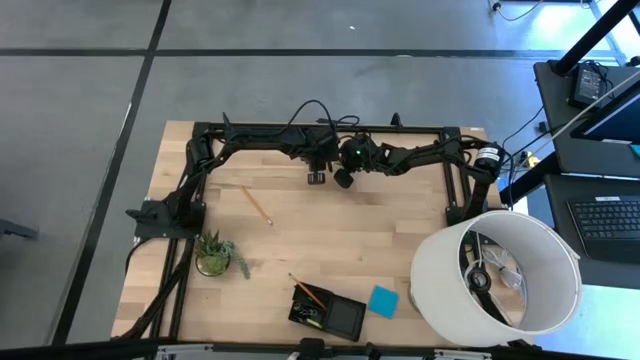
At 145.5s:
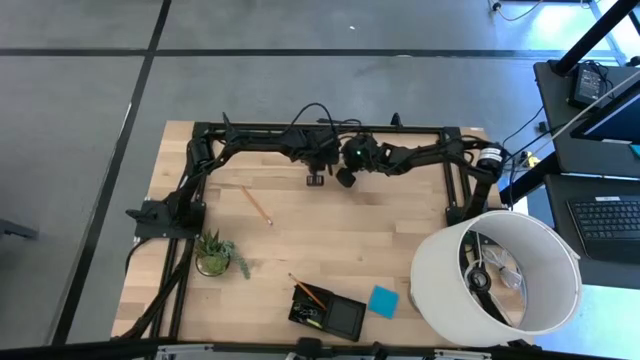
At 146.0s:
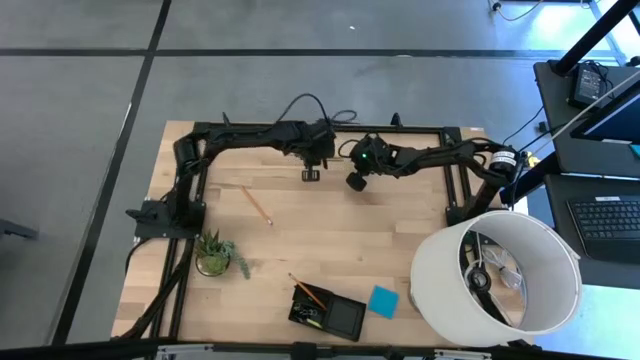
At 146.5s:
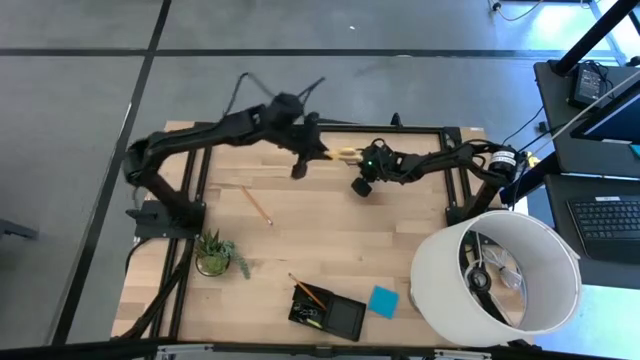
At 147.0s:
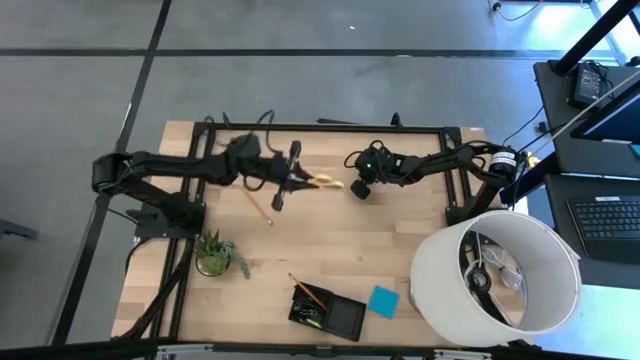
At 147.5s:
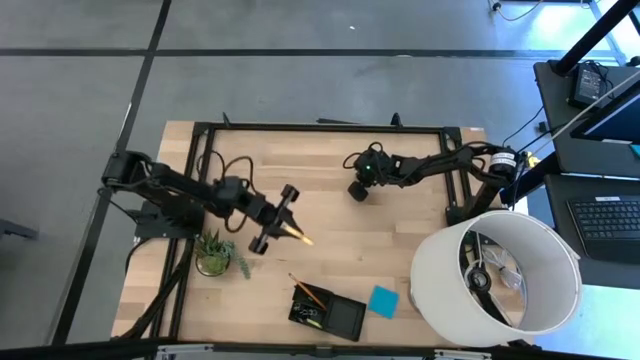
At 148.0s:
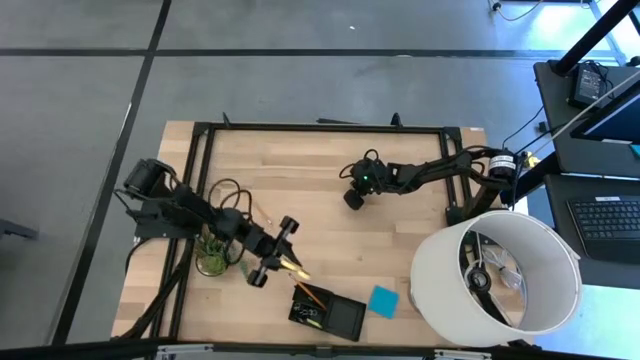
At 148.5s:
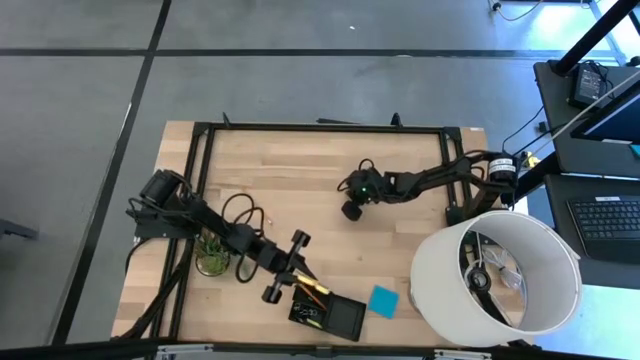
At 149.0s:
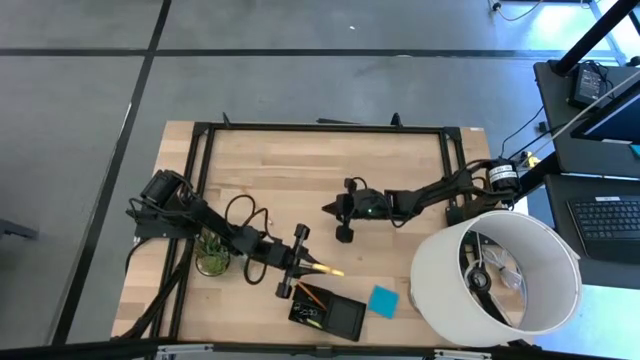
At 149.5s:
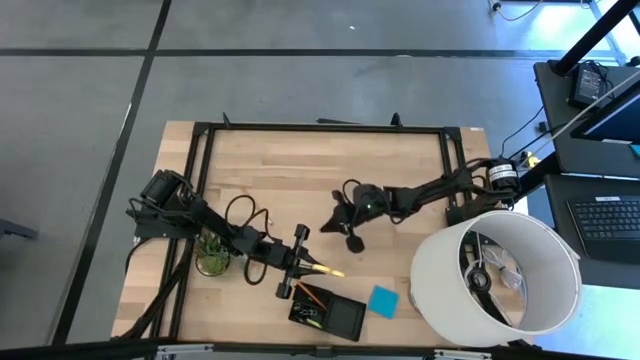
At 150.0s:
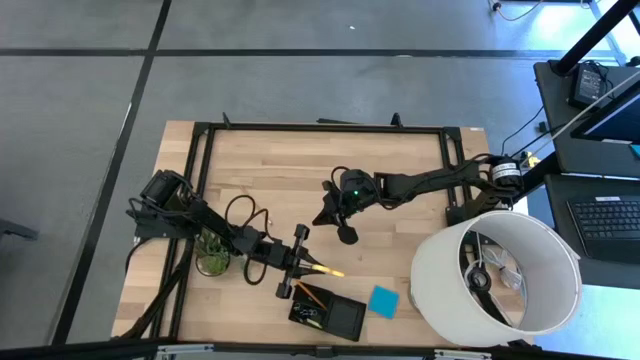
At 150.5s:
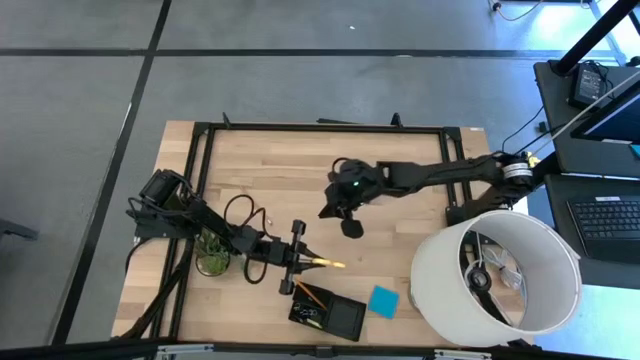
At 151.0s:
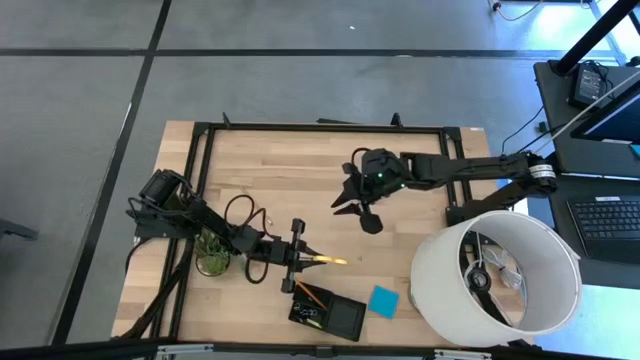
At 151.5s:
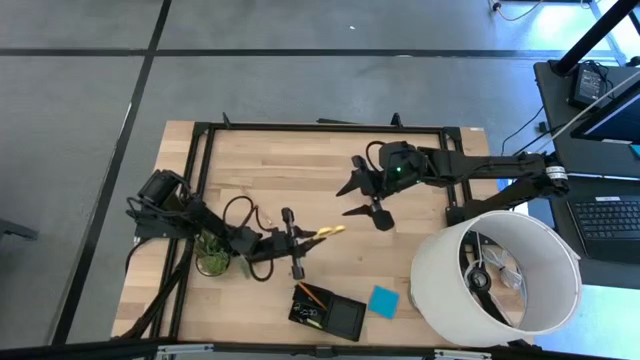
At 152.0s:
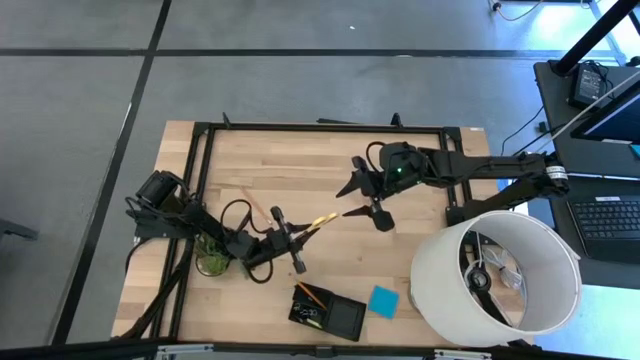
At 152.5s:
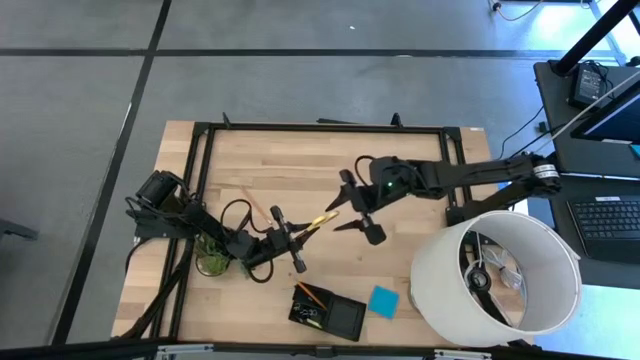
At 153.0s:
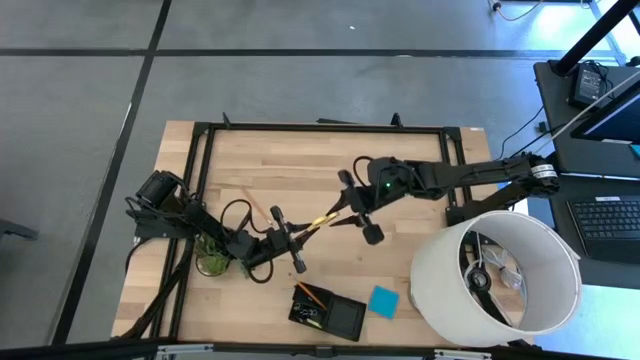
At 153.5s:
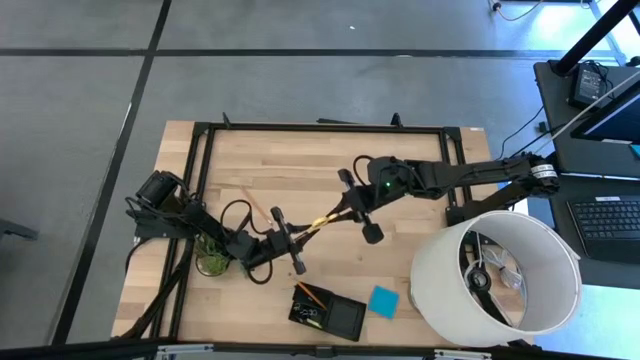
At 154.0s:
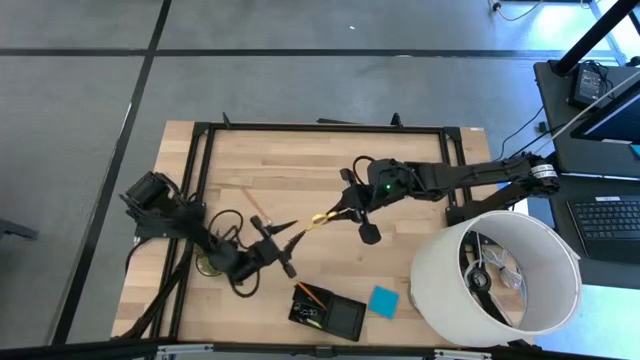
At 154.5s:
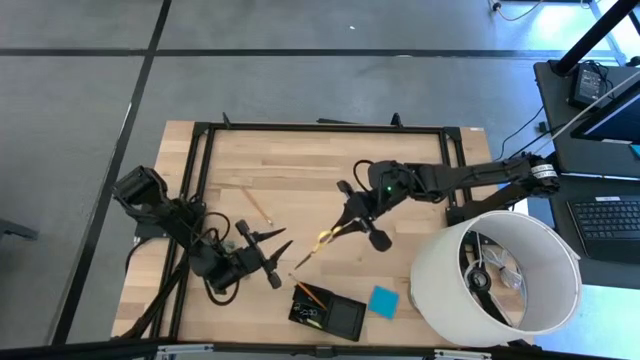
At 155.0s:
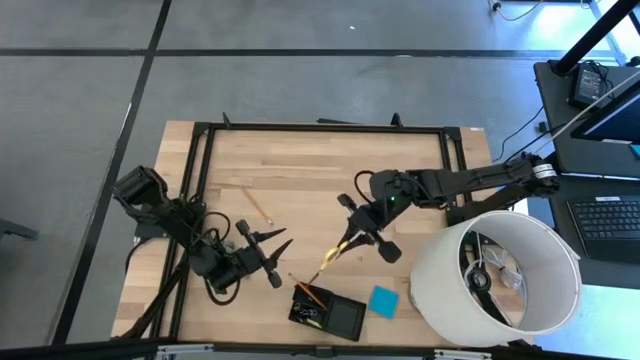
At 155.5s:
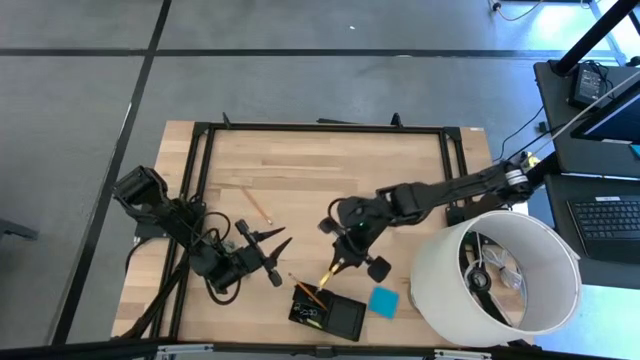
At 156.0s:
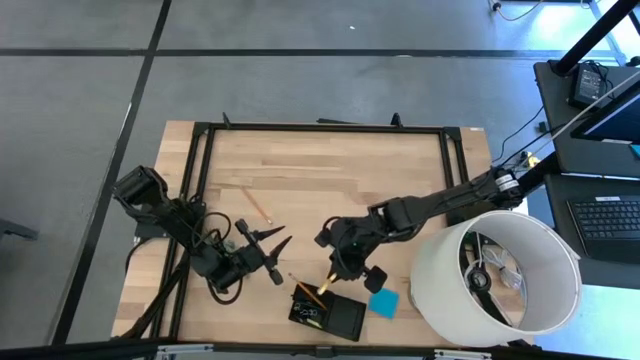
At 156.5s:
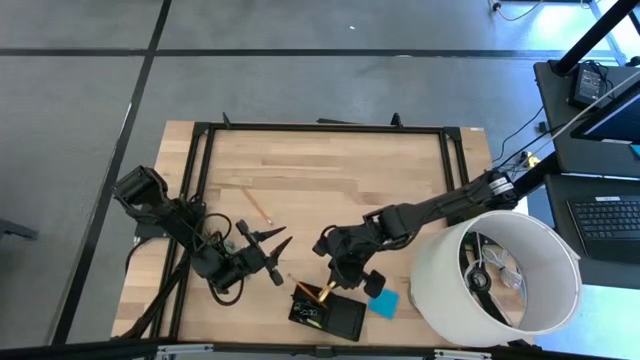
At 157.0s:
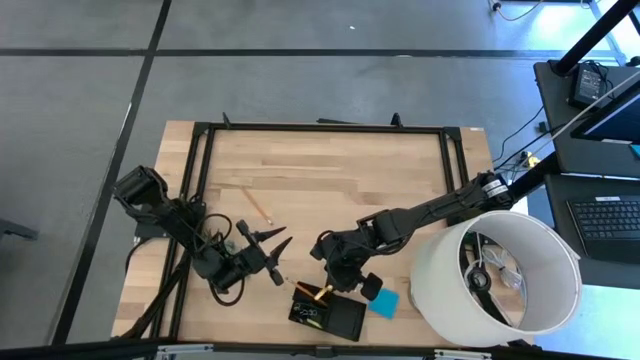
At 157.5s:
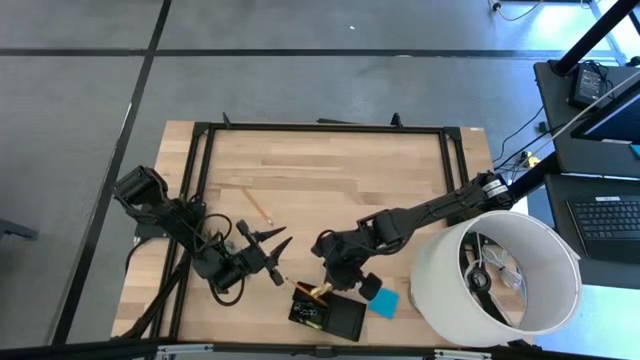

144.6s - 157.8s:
Task: Pick and place office supplies into organizer
Put the yellow scissors into the black desk organizer

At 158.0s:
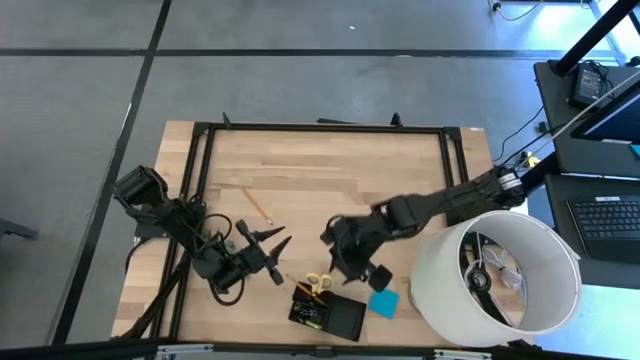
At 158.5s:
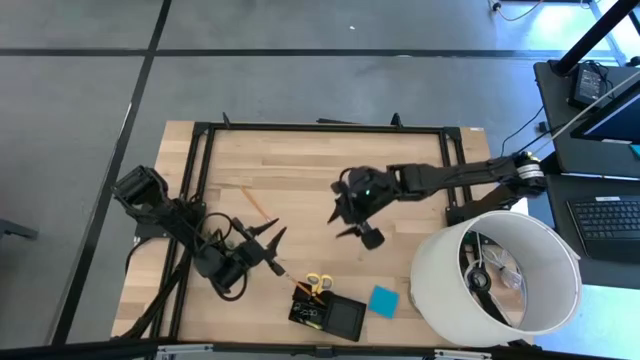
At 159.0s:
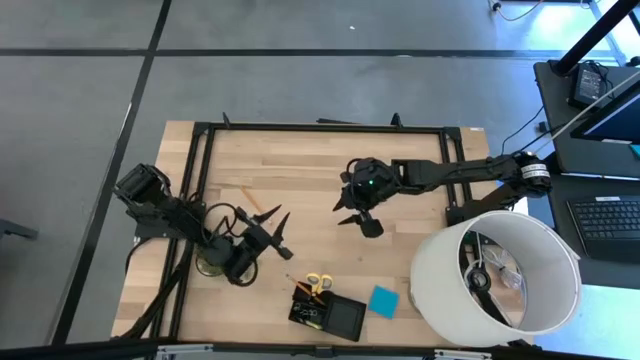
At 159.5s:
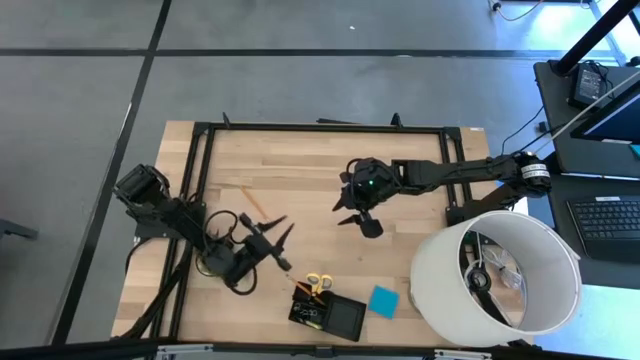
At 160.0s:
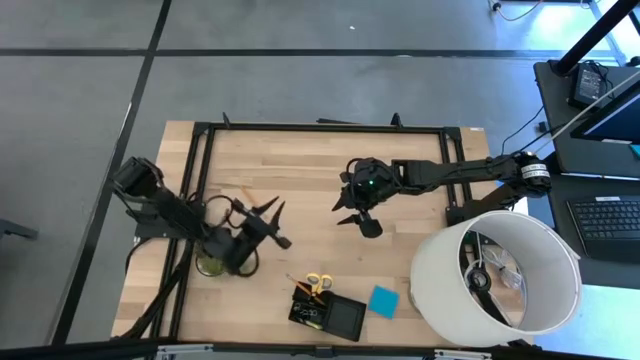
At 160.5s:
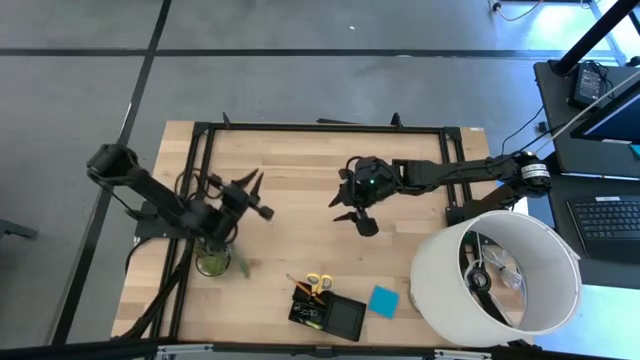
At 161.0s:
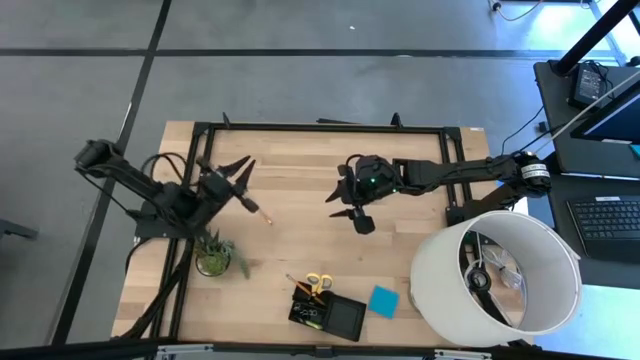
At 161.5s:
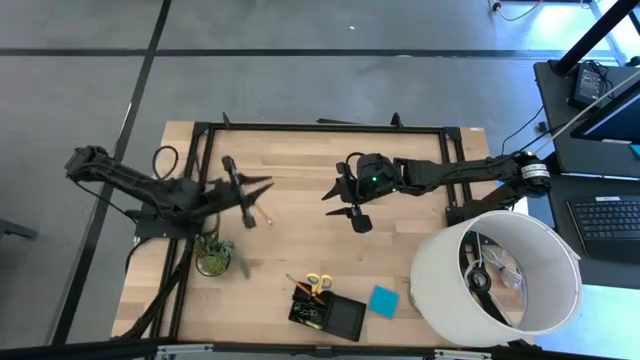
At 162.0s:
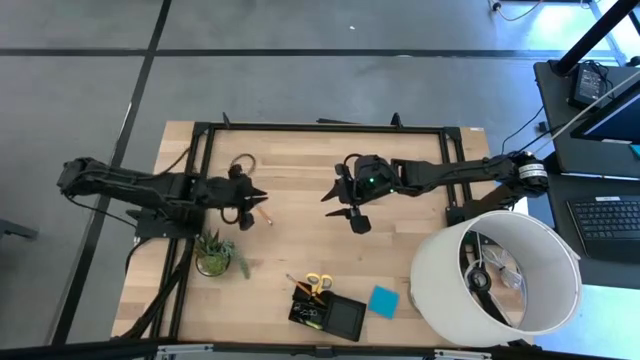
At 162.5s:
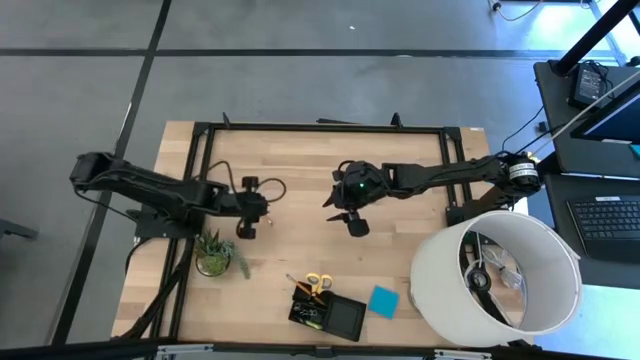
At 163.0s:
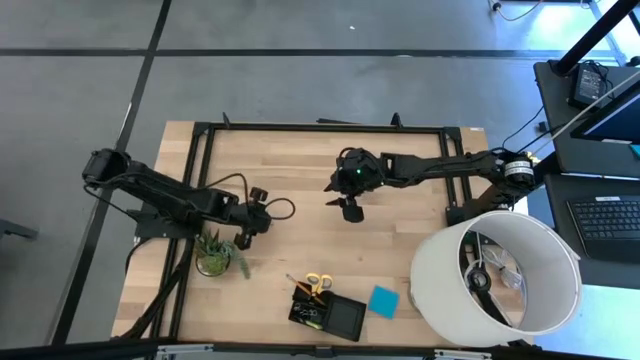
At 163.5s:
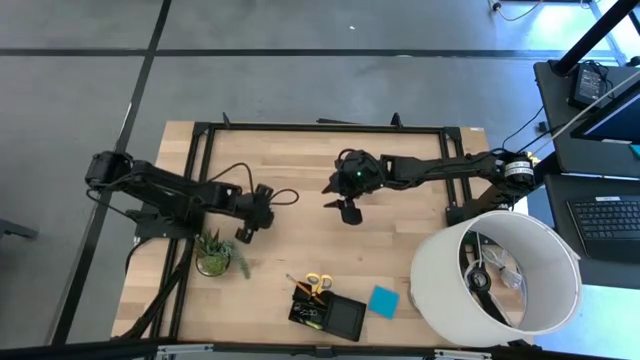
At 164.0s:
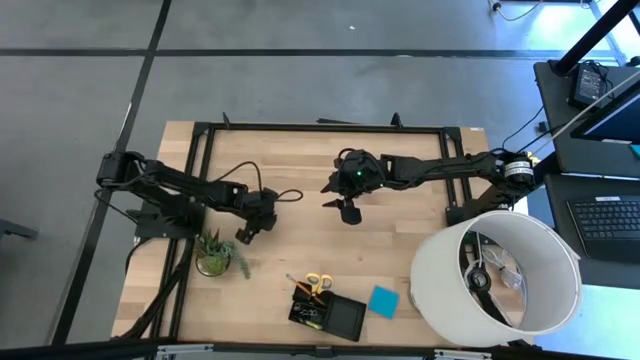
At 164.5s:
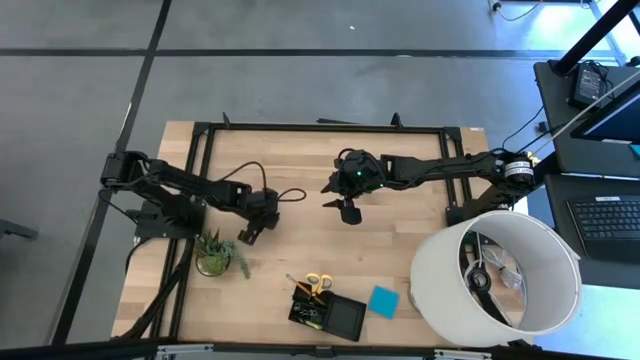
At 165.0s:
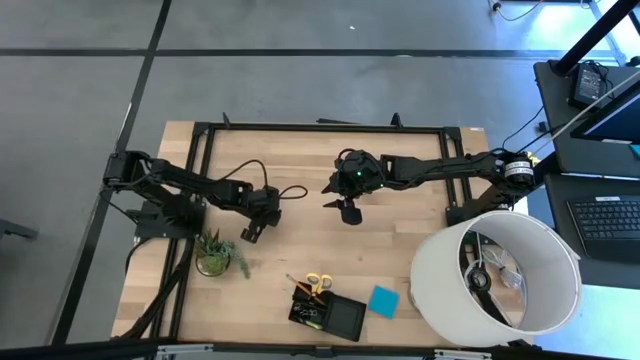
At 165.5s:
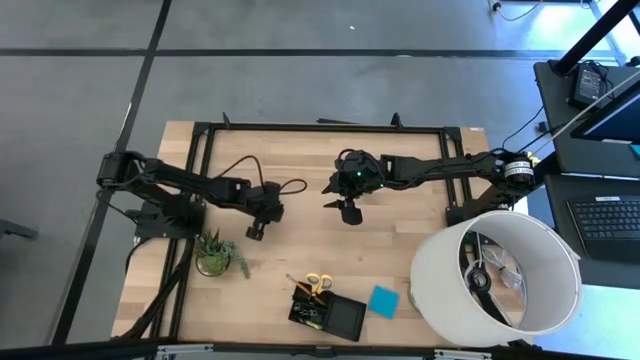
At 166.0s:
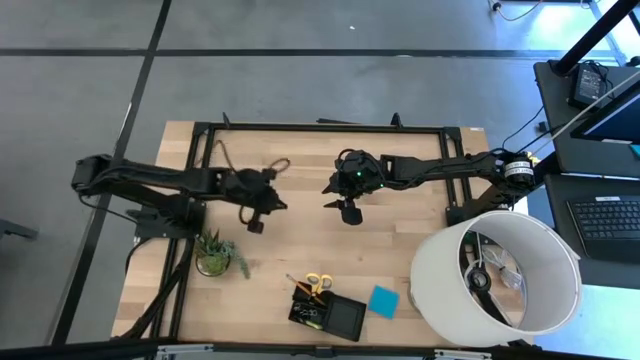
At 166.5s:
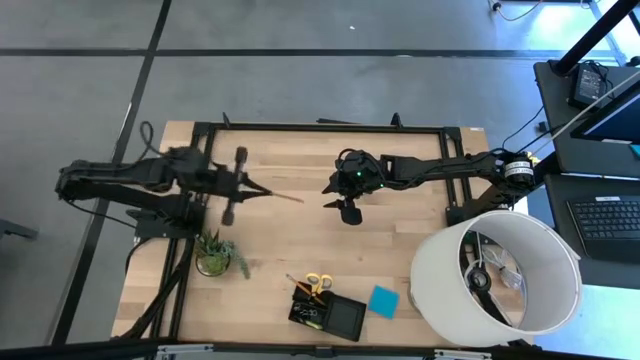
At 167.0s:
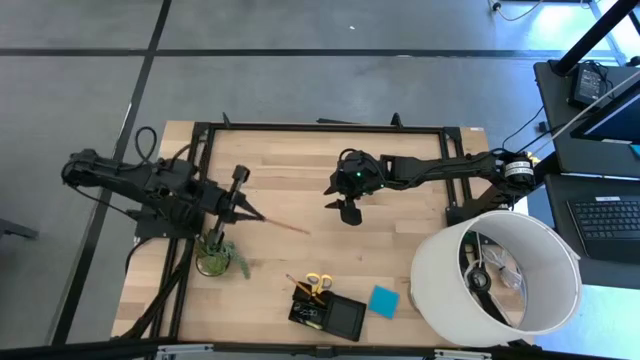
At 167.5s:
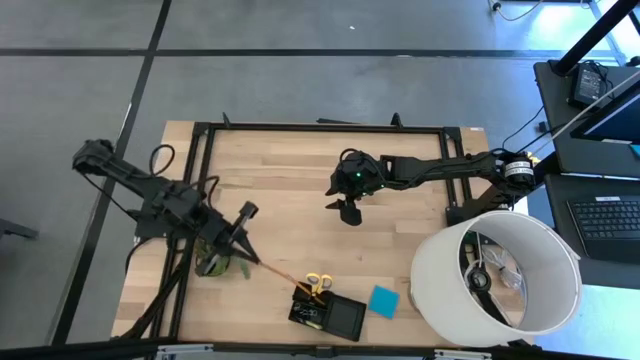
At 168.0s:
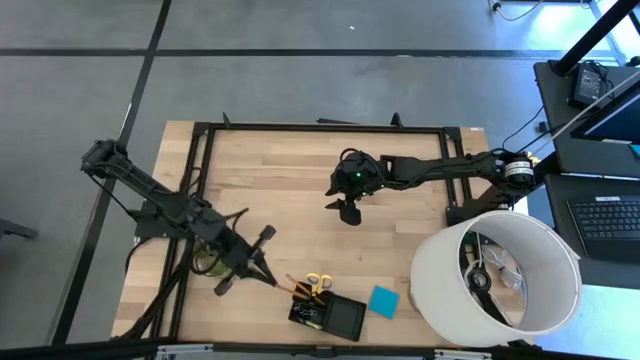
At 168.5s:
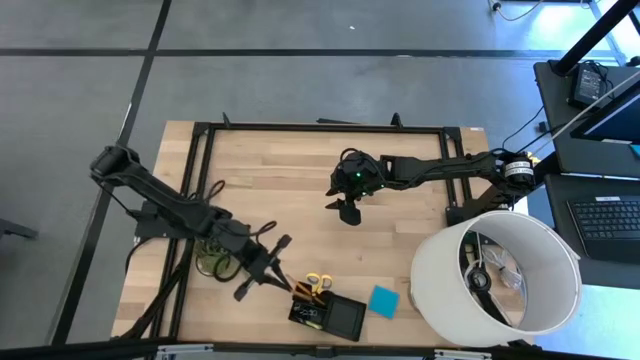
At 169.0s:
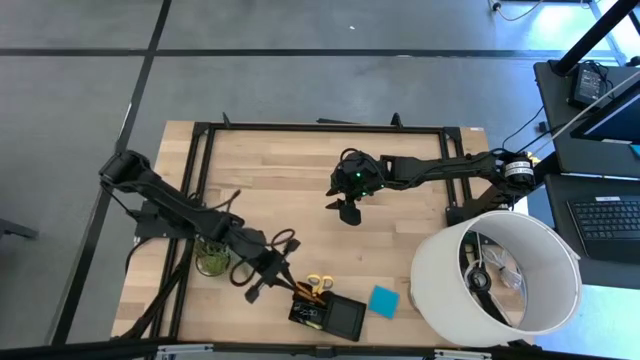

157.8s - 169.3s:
Put the yellow pencil into the black desk organizer
